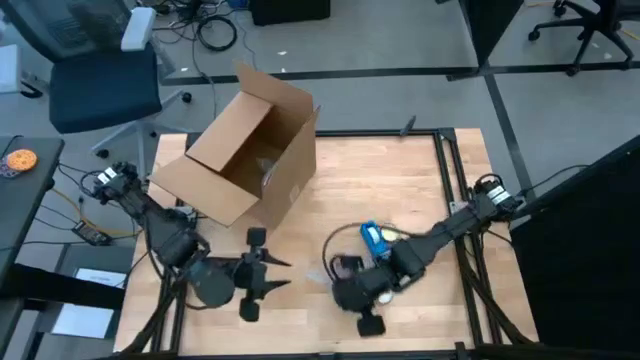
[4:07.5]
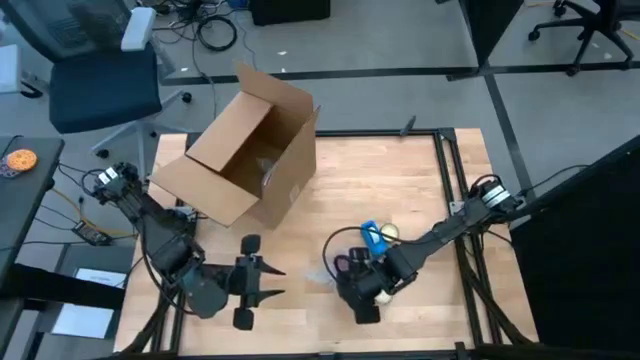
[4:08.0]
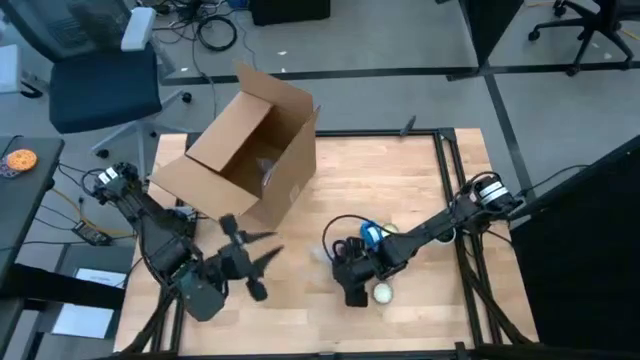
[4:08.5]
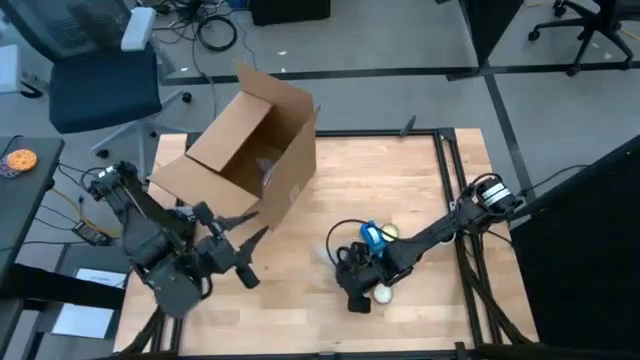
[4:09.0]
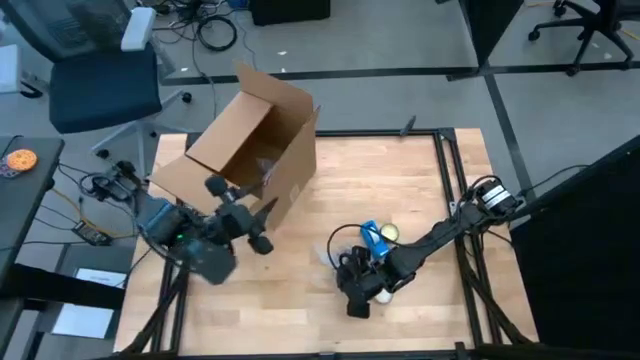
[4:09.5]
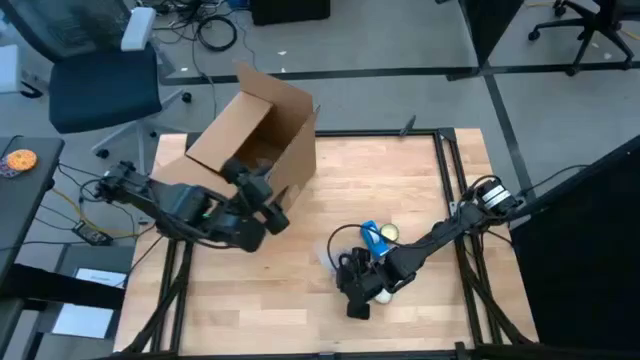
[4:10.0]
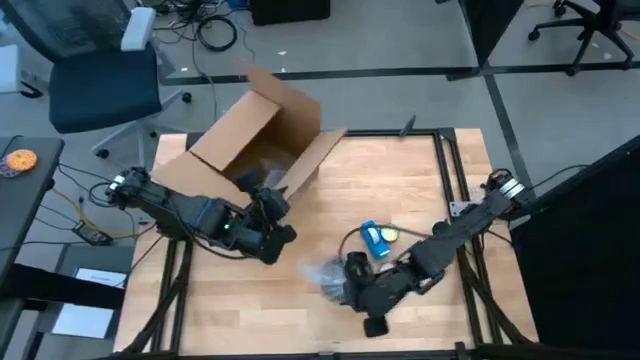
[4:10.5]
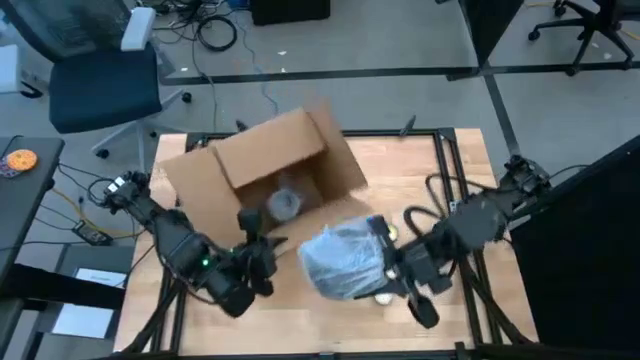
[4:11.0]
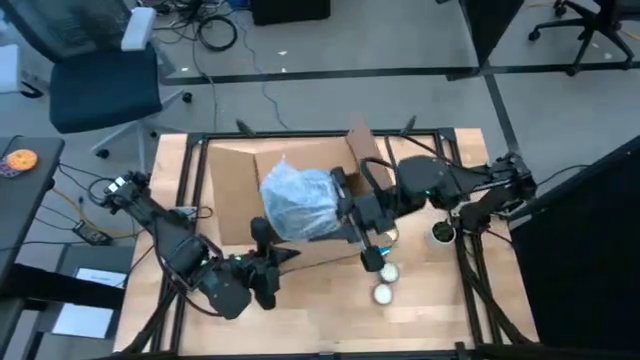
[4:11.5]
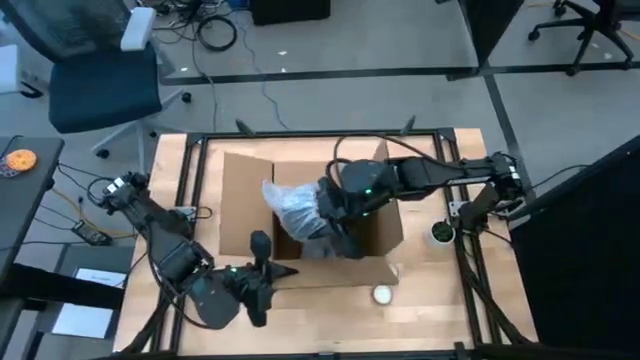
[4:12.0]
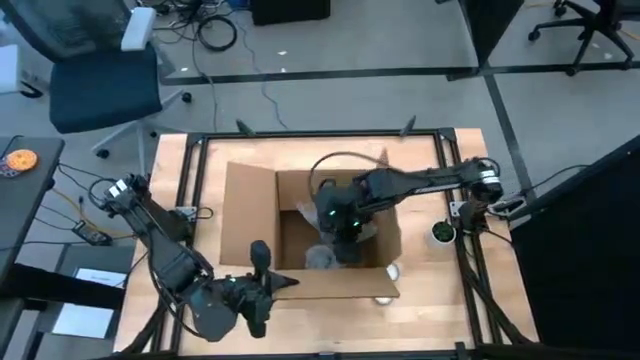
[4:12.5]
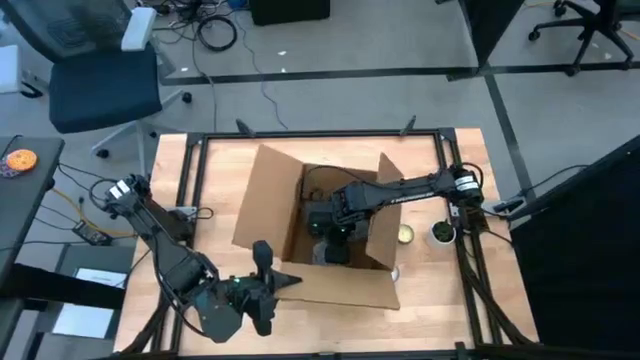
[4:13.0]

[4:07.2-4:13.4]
Task: wrap mug
Put the bubble-wrapped mug into the box

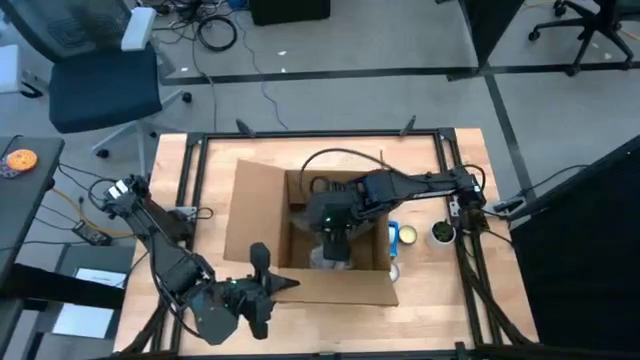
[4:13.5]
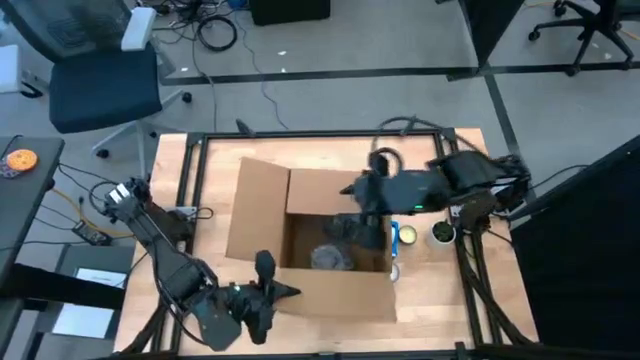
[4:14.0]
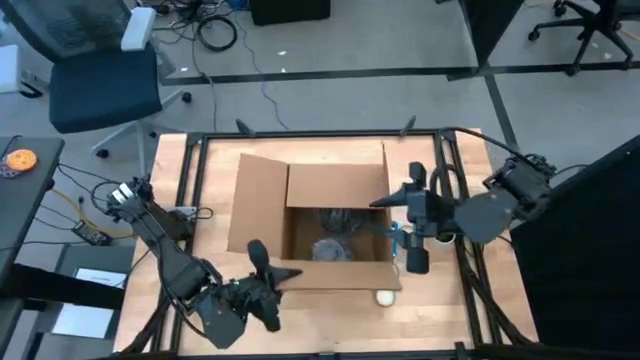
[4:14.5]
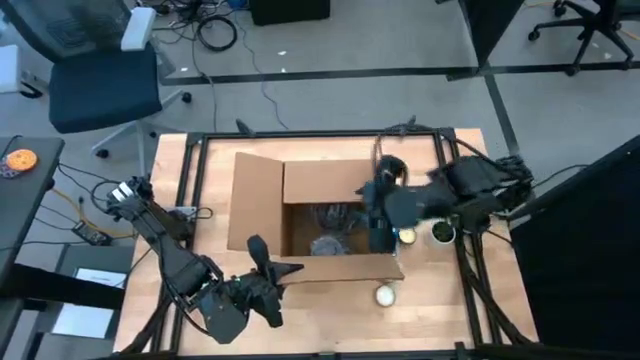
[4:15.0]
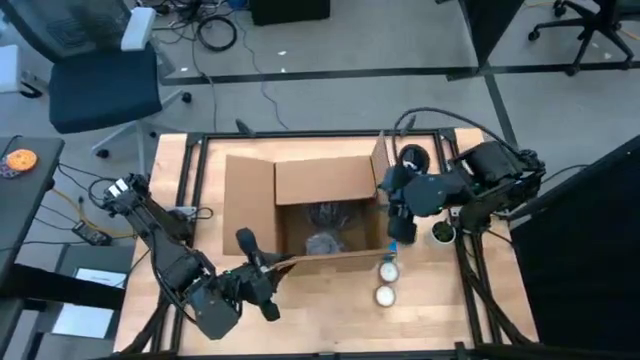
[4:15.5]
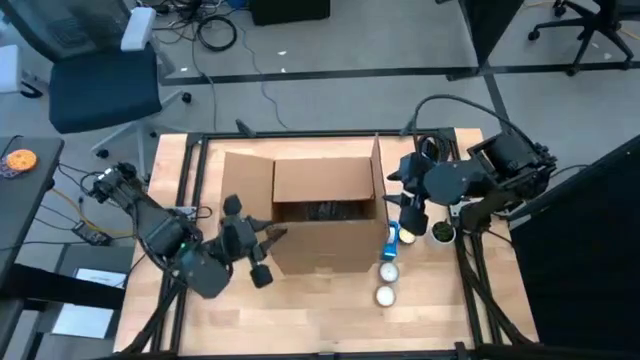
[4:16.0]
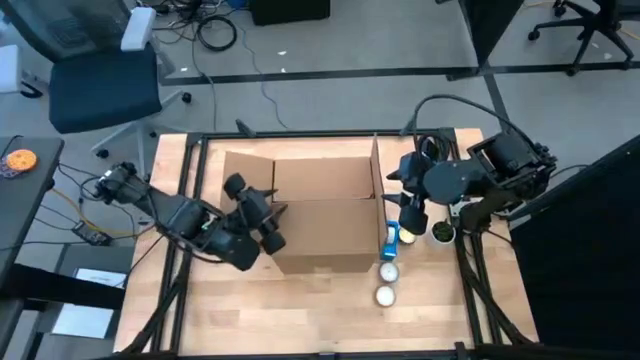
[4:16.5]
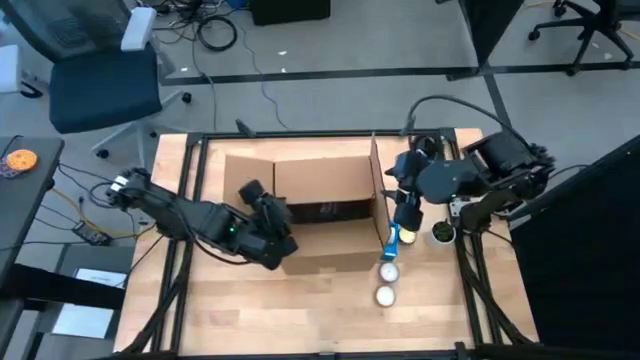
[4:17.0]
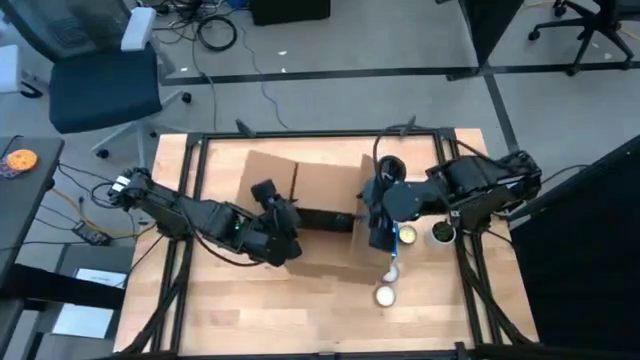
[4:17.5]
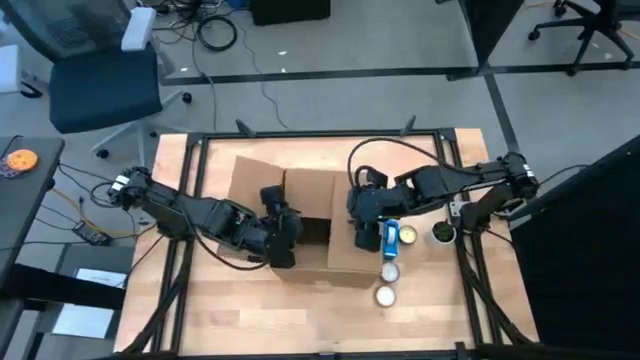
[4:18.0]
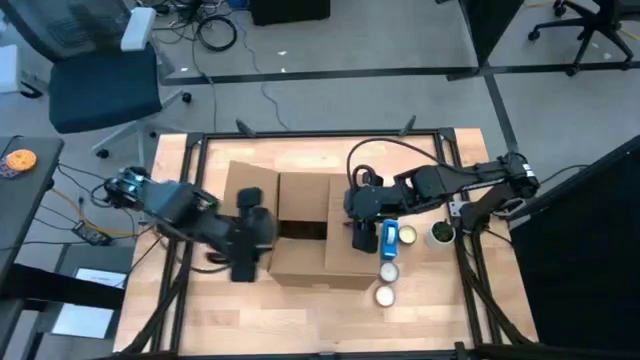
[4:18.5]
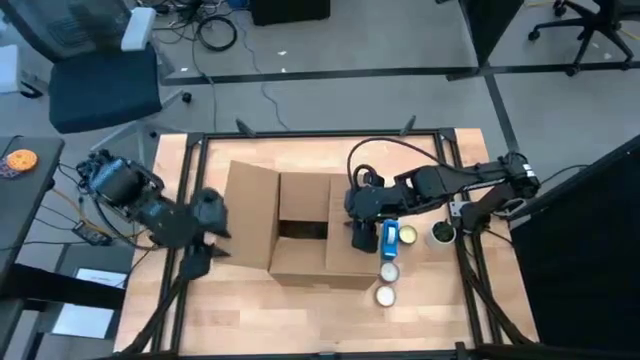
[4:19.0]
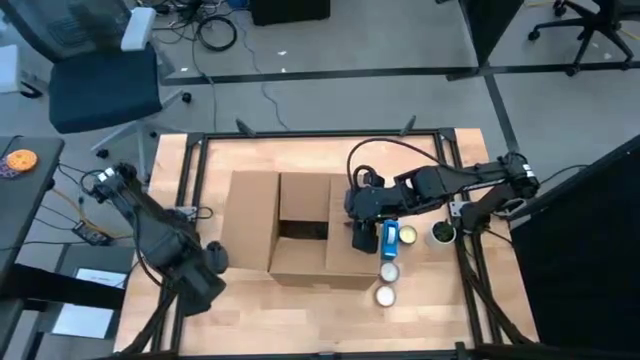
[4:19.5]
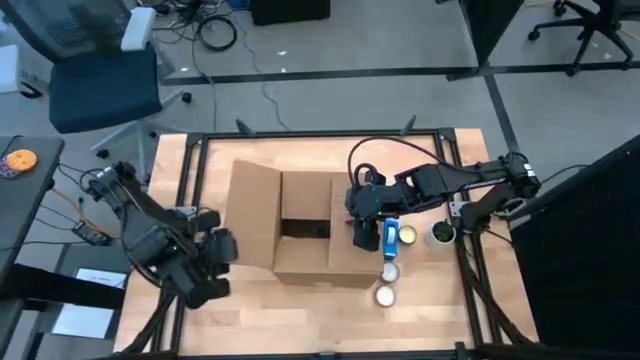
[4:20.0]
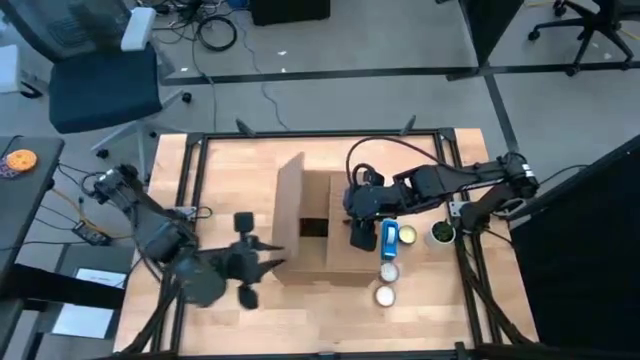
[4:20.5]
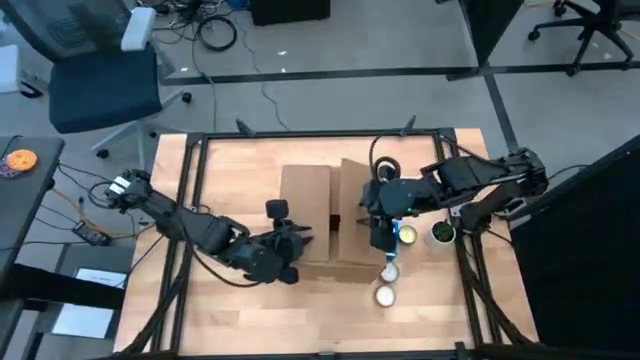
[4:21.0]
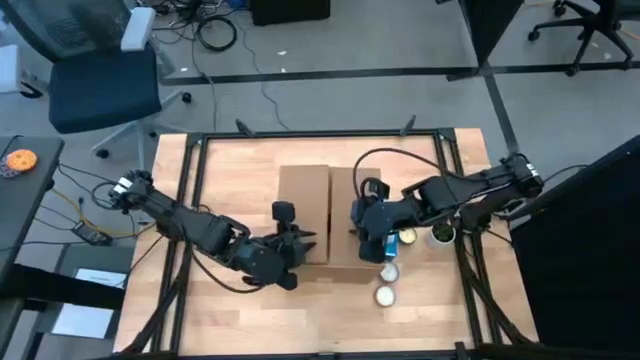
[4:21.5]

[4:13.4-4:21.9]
Close the box

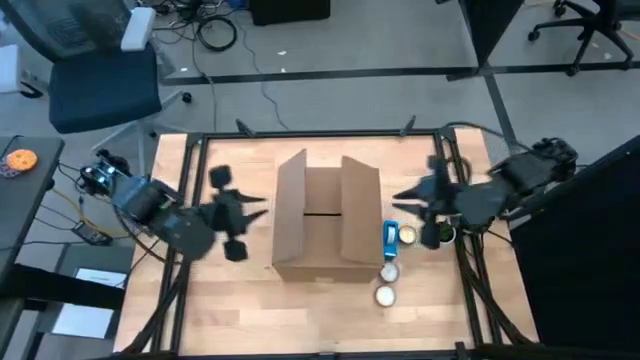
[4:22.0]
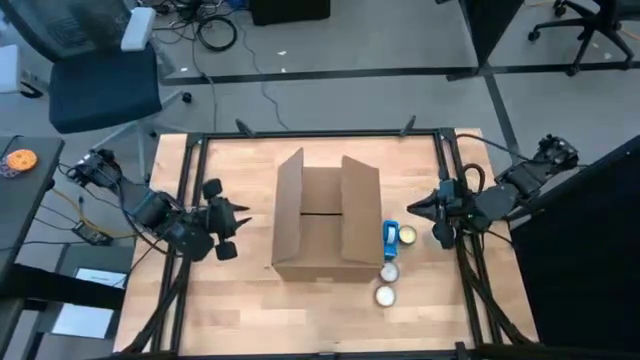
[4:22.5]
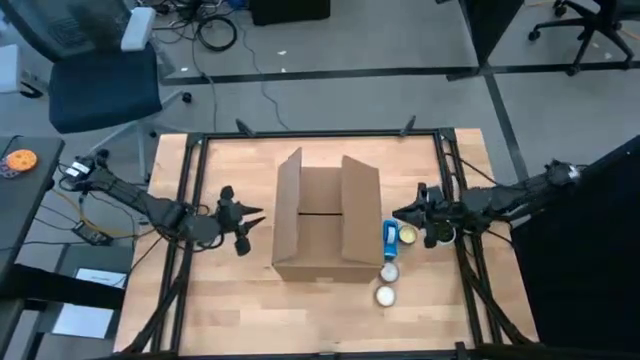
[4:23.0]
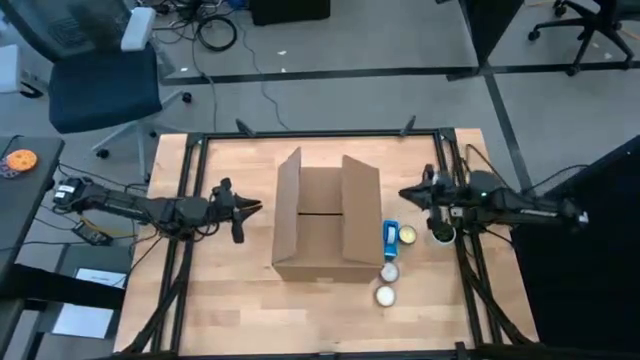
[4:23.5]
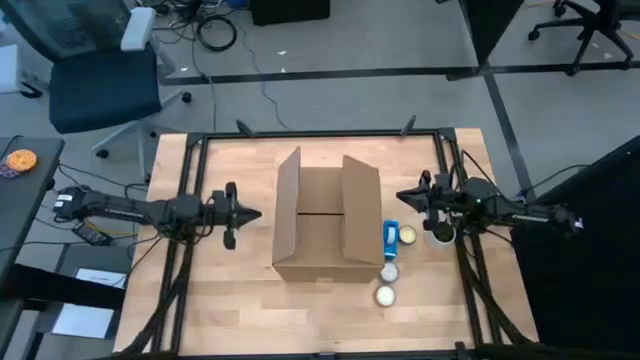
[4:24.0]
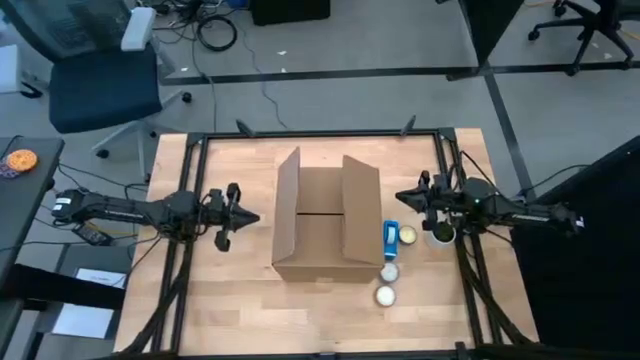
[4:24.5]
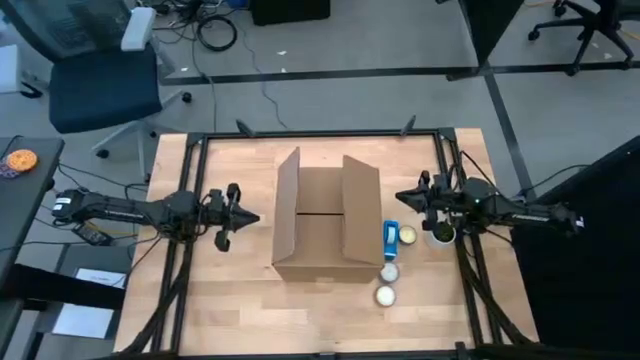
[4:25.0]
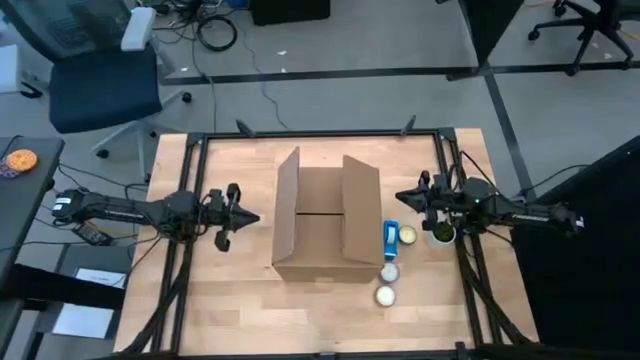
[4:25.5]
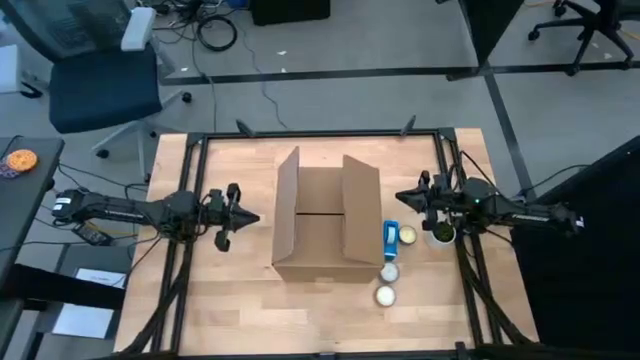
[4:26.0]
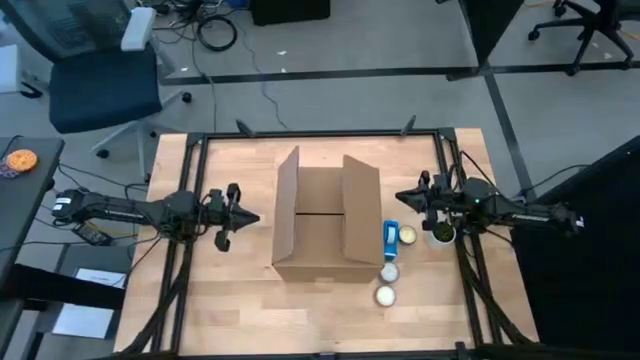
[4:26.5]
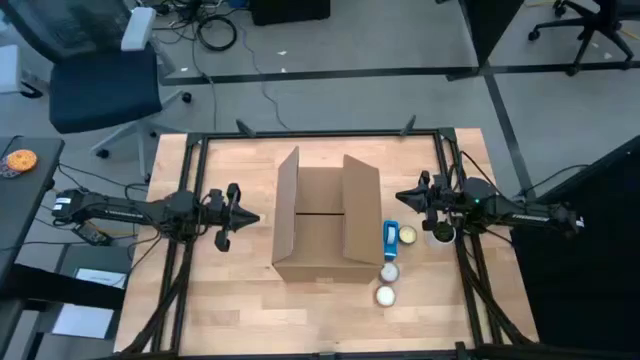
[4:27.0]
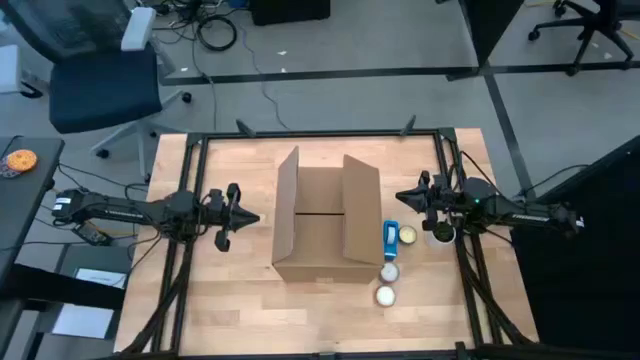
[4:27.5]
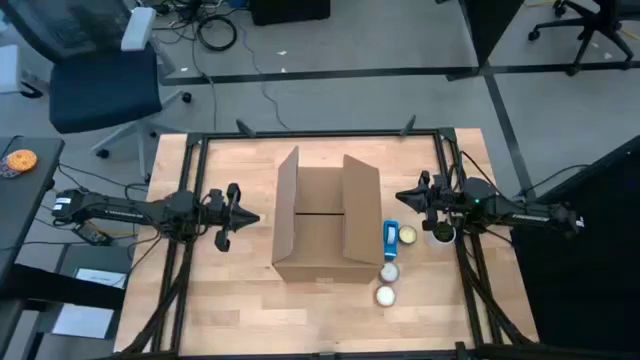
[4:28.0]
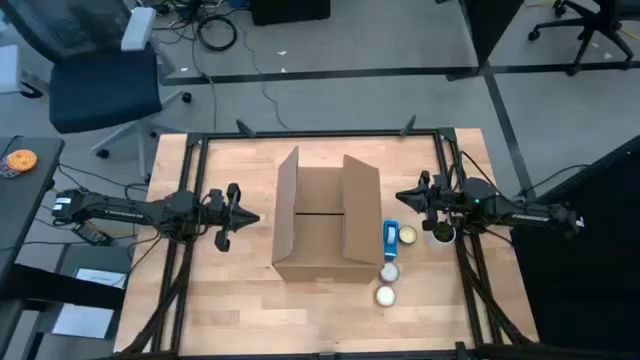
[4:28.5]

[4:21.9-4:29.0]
Return to Home Position
